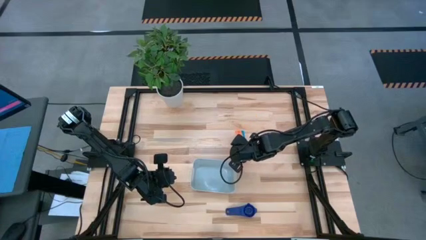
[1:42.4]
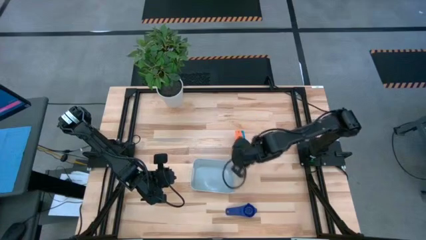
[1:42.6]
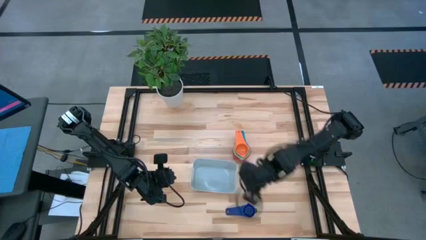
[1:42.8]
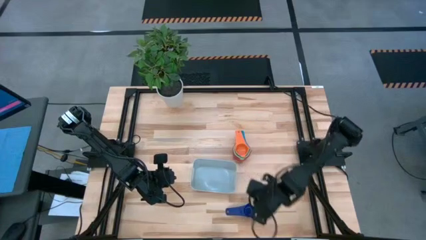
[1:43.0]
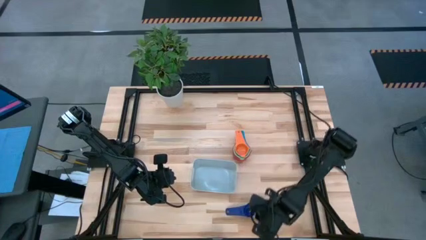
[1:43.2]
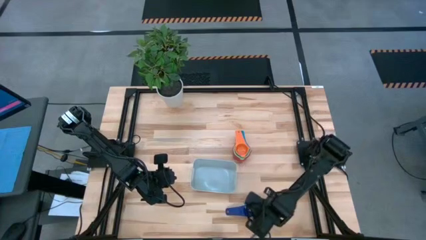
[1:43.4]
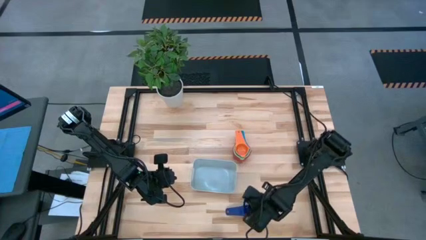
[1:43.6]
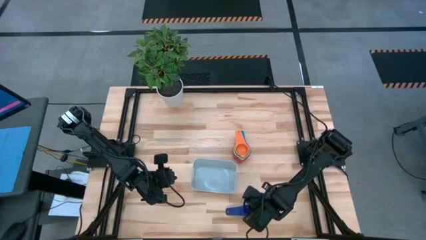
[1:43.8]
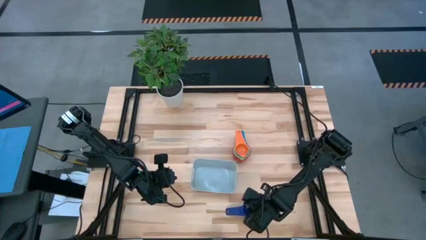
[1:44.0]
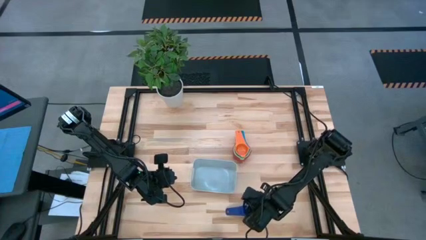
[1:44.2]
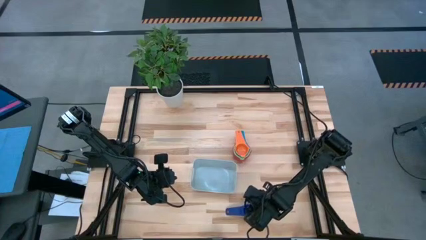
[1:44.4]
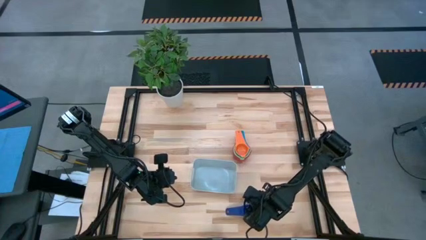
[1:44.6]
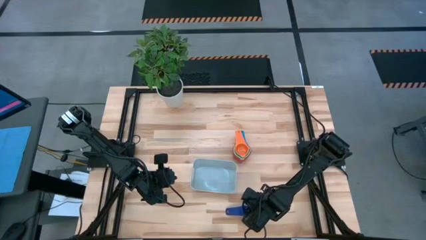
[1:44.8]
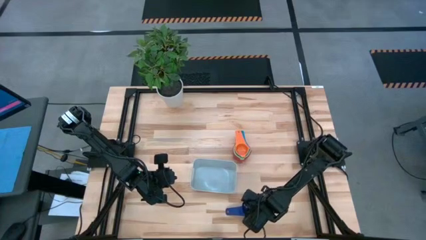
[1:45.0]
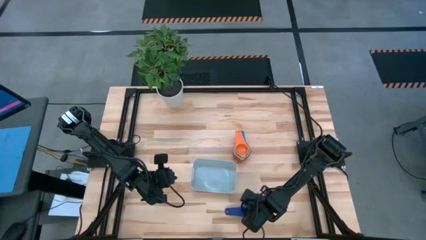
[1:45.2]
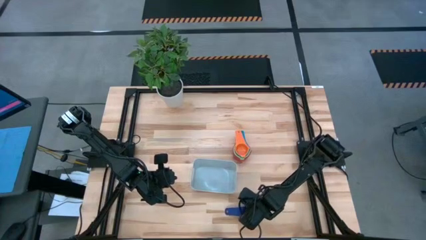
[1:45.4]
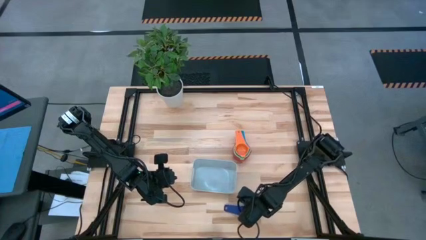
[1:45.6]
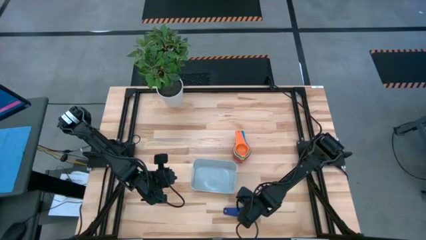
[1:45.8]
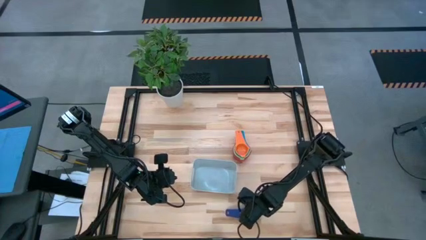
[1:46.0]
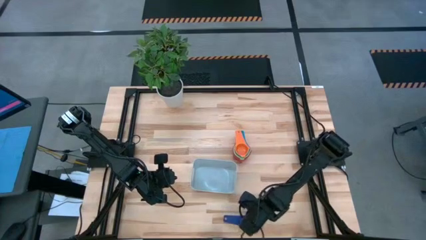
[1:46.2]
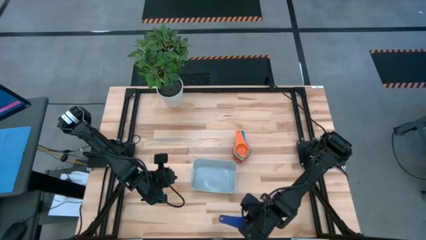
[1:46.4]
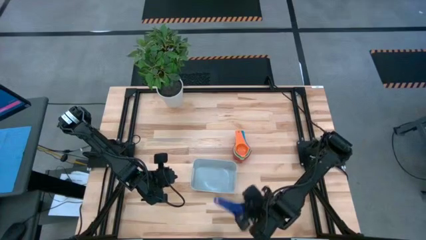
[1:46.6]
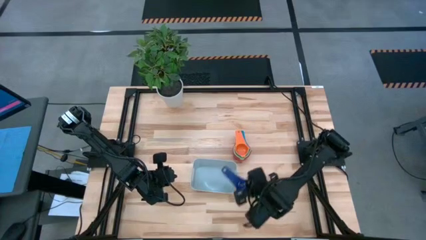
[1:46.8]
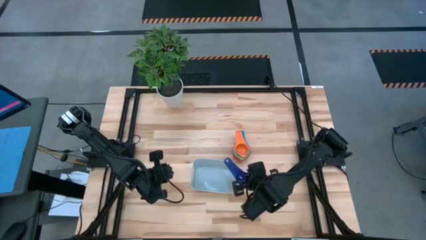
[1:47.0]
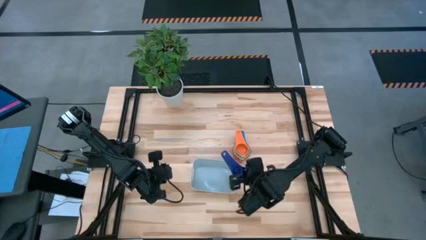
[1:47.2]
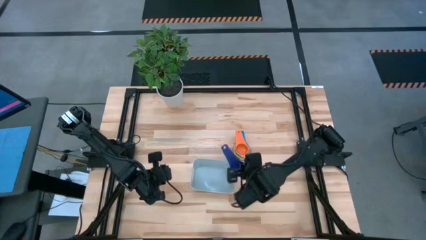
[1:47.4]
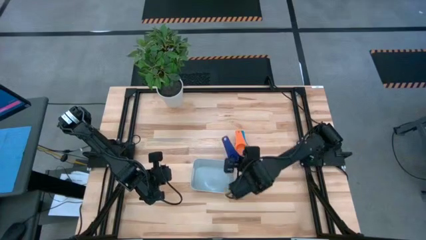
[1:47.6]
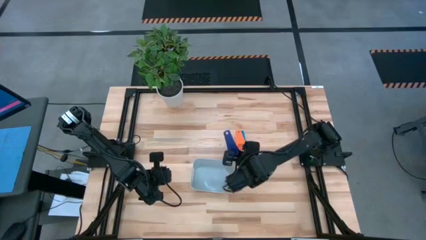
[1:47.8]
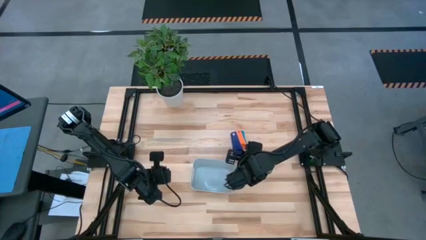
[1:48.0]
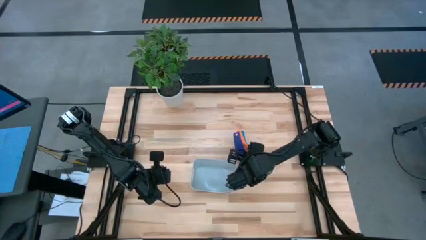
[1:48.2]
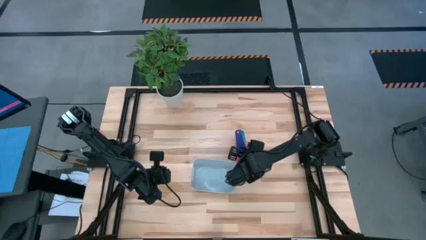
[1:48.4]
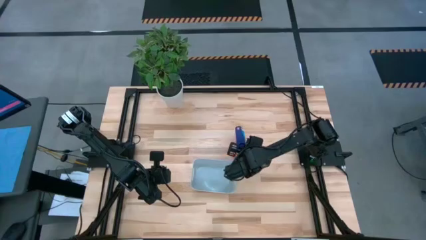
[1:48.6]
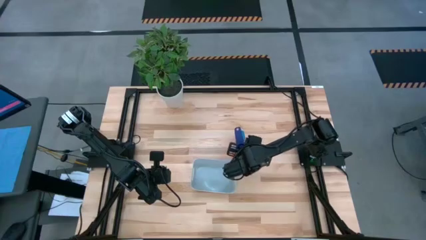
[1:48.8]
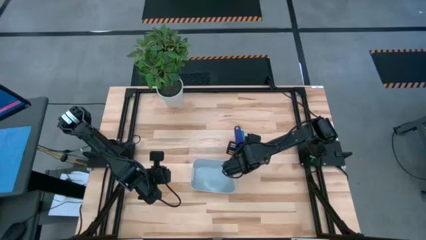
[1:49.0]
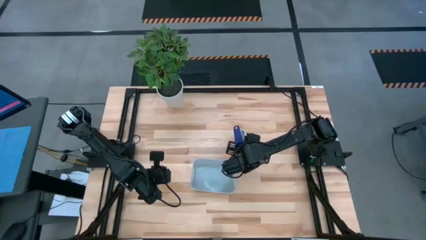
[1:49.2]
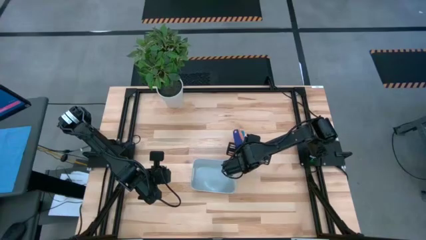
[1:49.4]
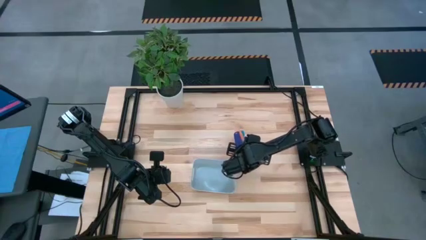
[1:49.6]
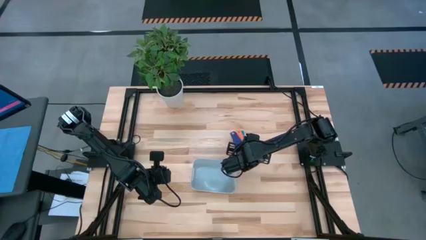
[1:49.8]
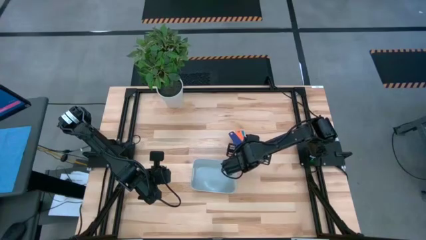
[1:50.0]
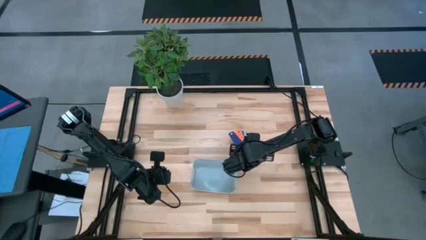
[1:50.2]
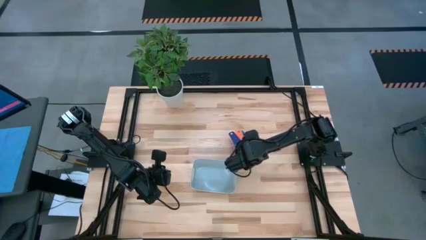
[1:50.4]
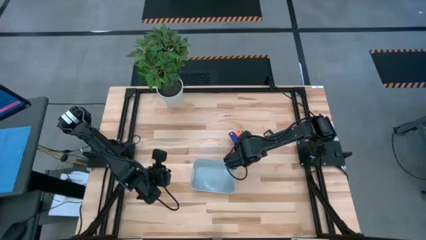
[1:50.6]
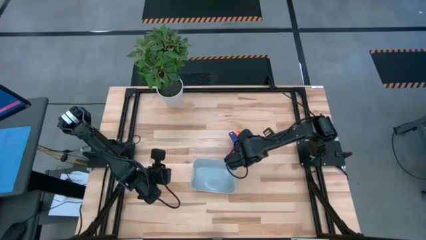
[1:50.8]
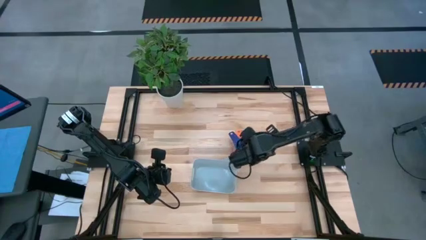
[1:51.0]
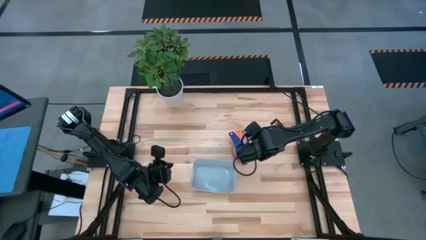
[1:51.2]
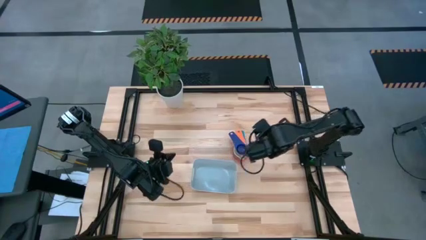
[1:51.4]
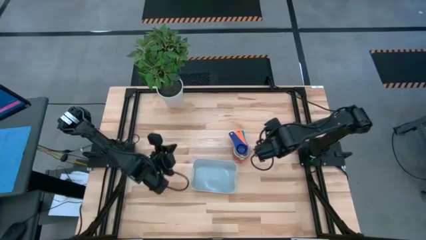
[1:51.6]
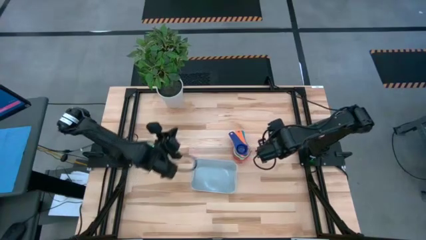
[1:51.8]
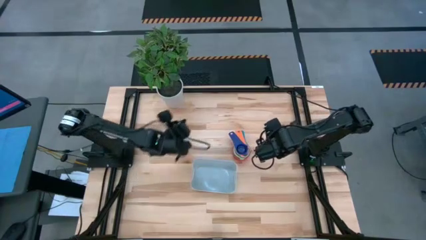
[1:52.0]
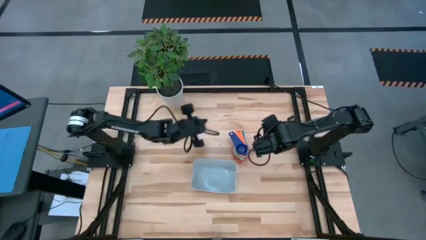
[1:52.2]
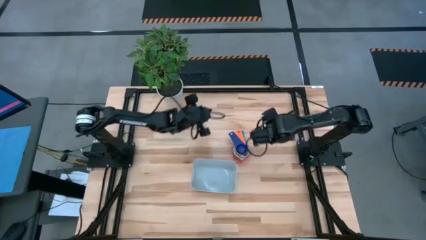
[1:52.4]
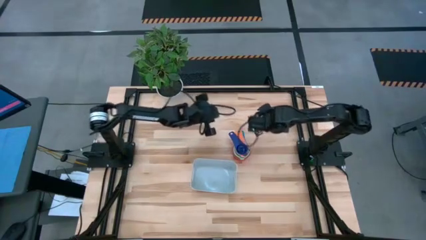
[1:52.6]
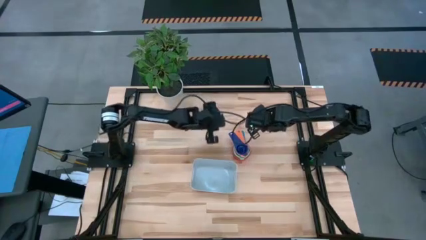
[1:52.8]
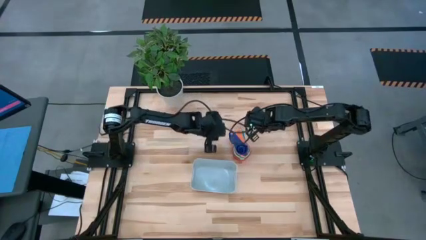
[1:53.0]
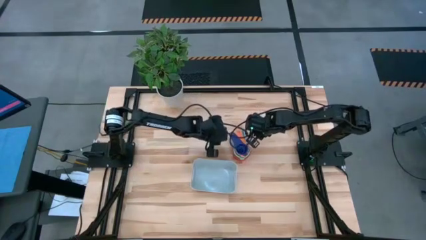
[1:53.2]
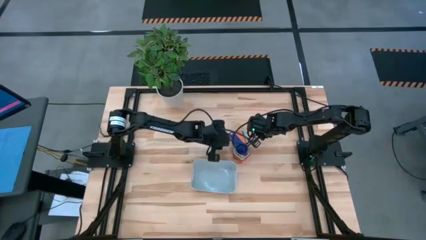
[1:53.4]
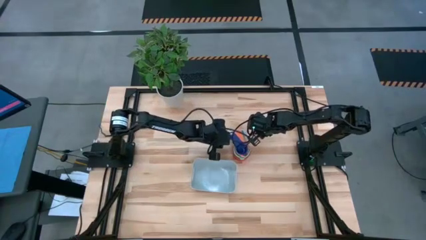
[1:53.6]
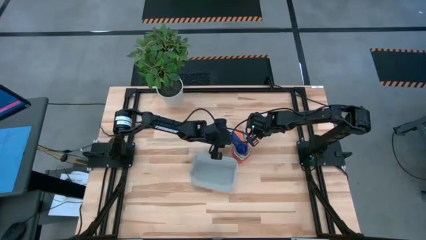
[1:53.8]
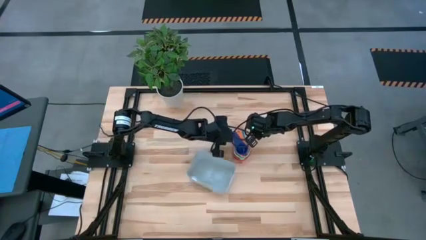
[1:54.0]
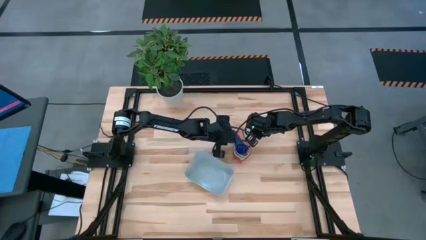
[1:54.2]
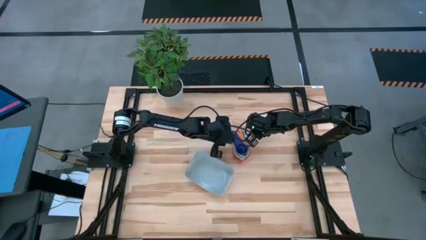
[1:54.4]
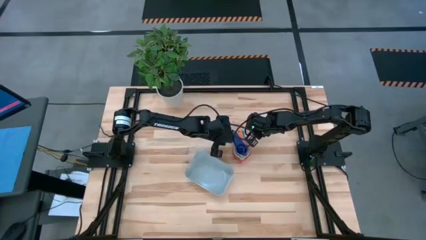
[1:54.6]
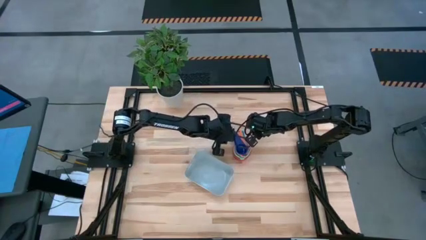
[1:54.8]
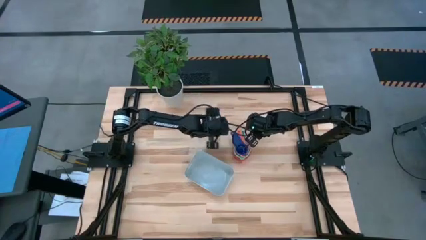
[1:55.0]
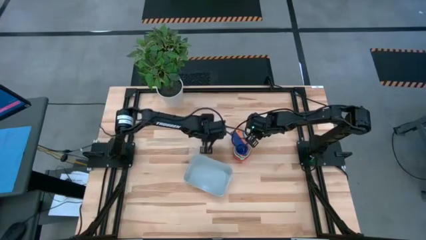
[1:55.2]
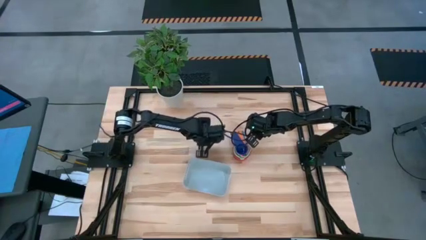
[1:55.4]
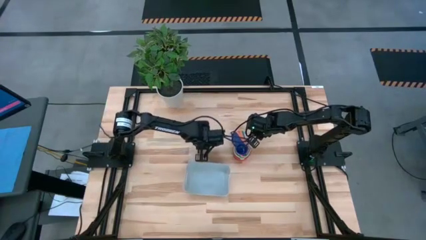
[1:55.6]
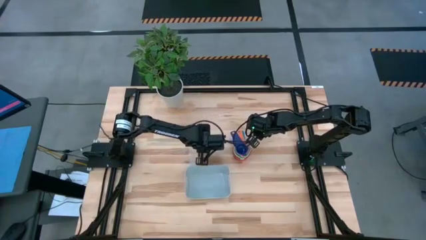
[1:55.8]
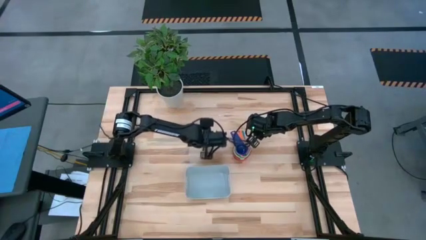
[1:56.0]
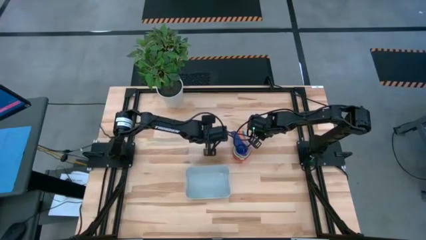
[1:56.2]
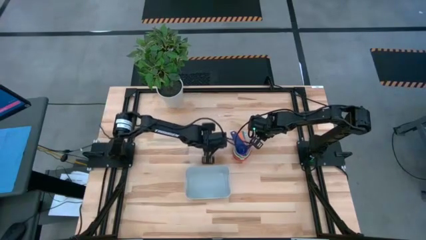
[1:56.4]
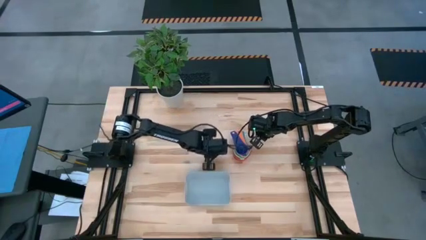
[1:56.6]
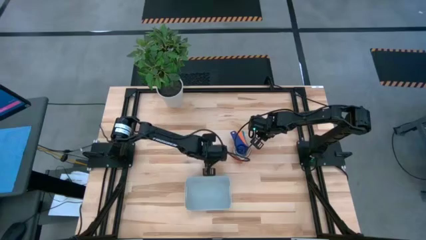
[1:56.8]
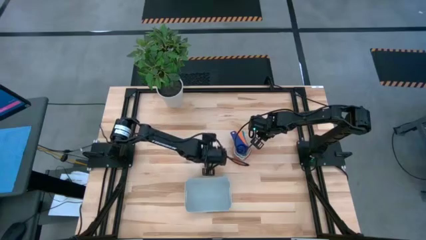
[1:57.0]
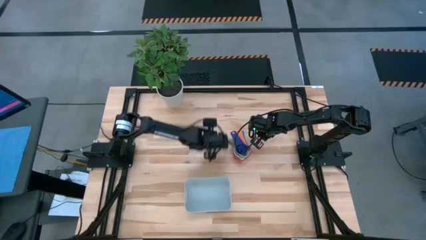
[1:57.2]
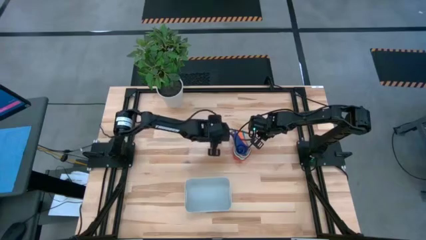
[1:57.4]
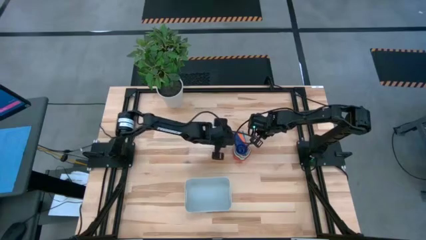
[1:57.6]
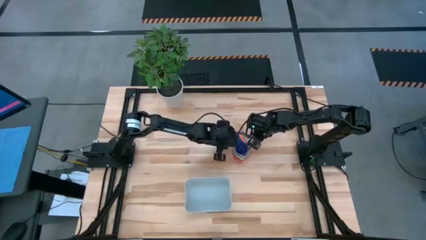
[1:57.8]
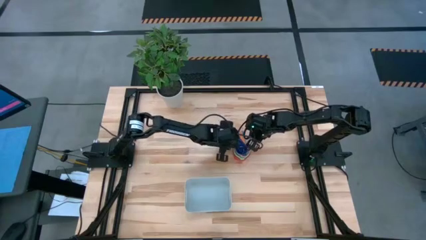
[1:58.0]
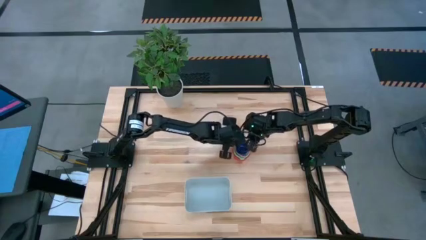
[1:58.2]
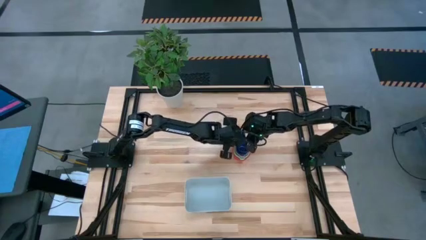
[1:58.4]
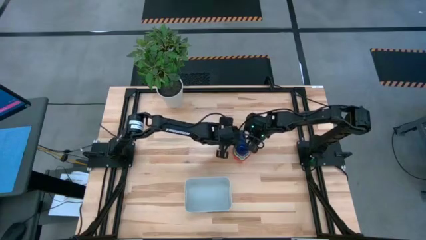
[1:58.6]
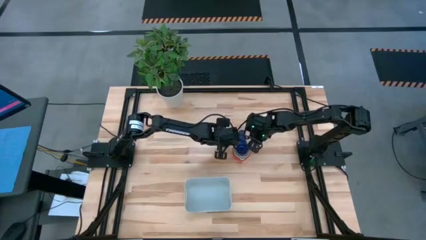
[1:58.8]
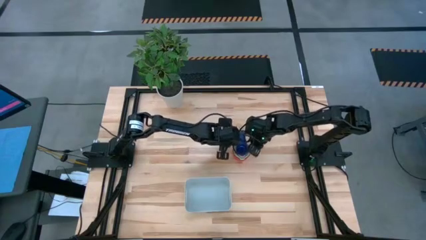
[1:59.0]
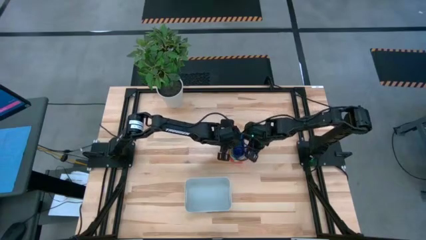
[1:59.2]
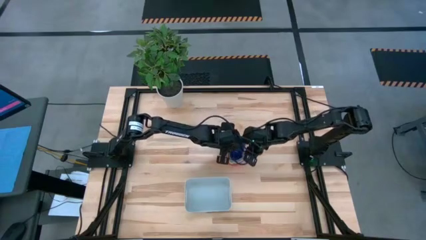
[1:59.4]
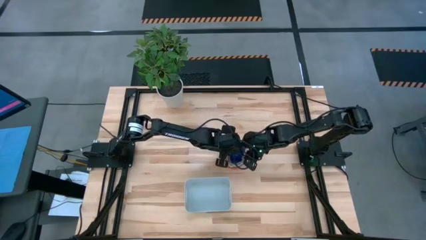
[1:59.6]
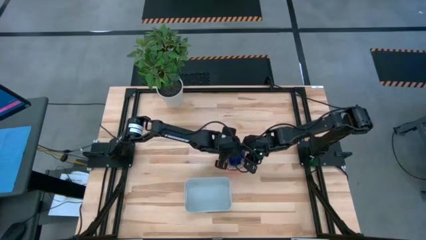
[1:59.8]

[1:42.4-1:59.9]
Task: Nest measuring cups in basket
Stack the dark blue measuring cup on top of the orange measuring cup
